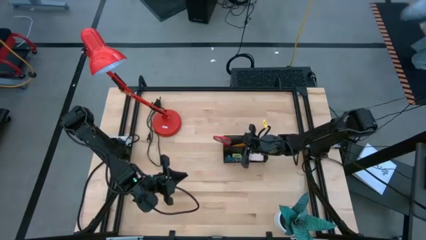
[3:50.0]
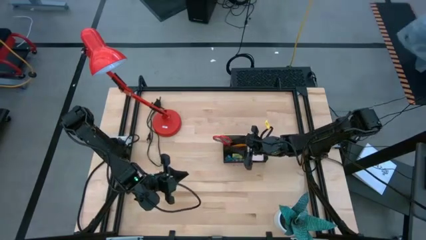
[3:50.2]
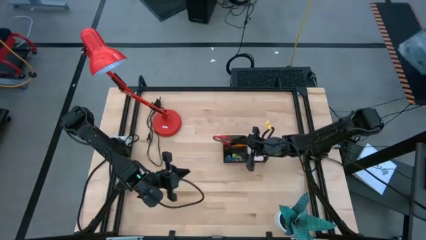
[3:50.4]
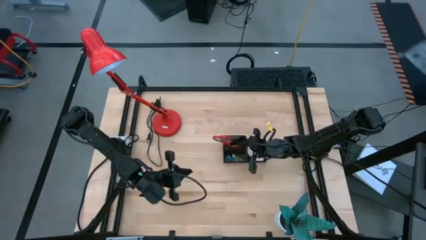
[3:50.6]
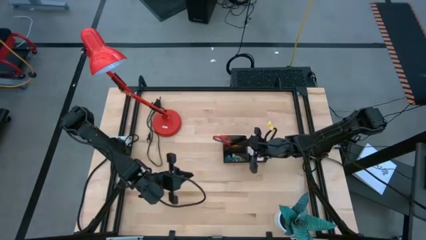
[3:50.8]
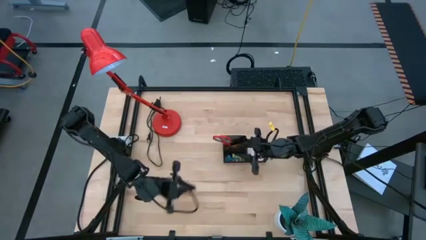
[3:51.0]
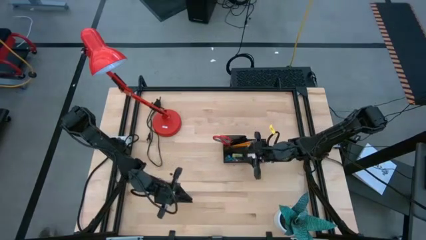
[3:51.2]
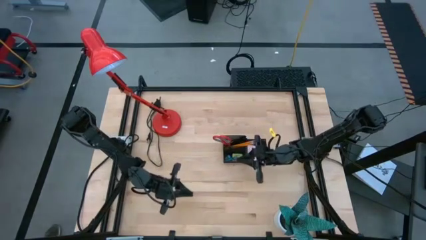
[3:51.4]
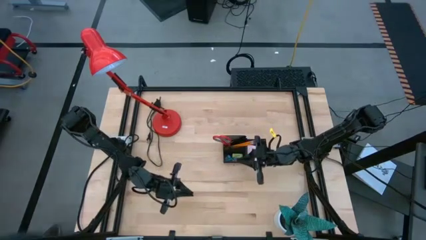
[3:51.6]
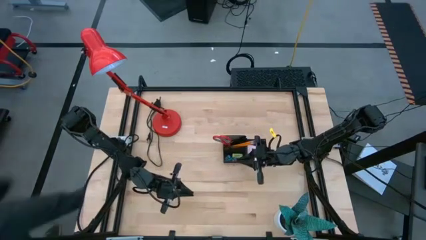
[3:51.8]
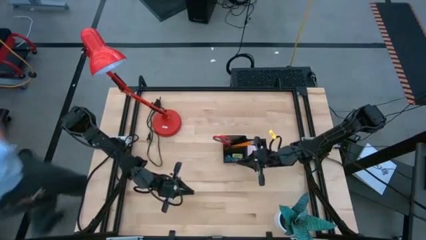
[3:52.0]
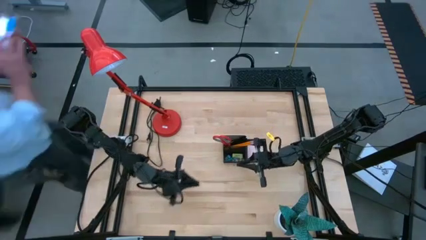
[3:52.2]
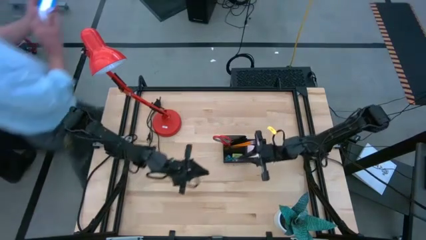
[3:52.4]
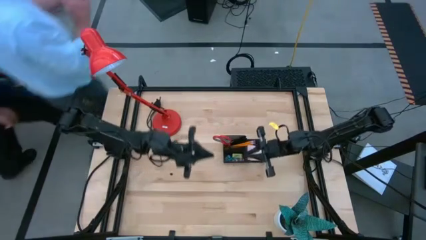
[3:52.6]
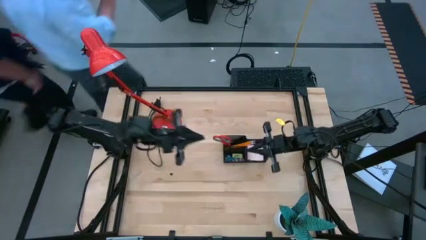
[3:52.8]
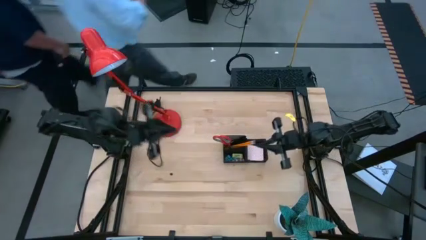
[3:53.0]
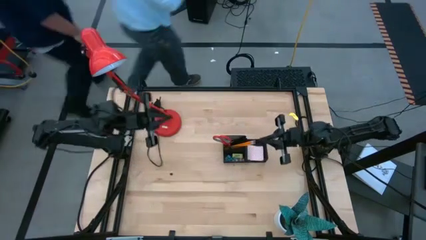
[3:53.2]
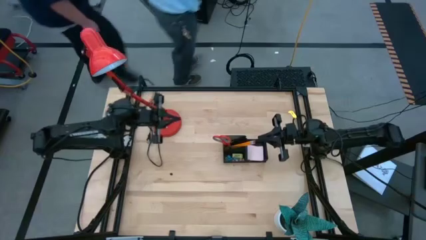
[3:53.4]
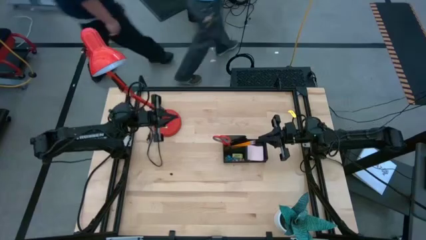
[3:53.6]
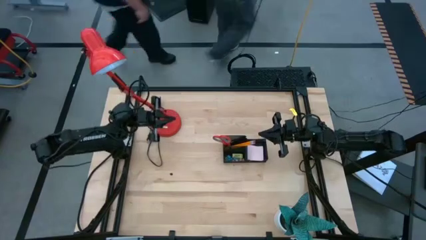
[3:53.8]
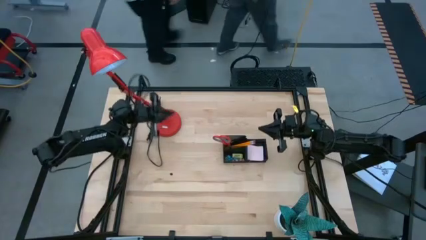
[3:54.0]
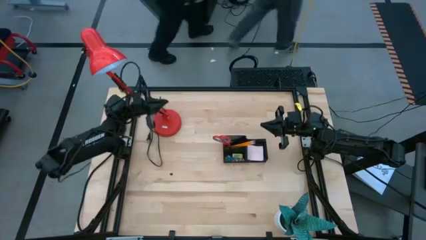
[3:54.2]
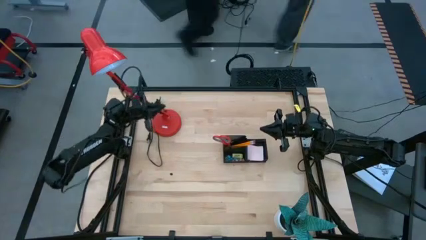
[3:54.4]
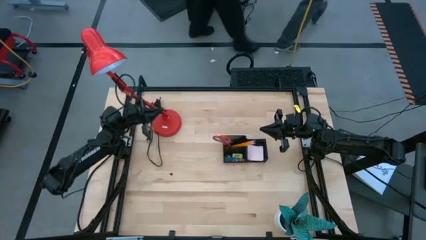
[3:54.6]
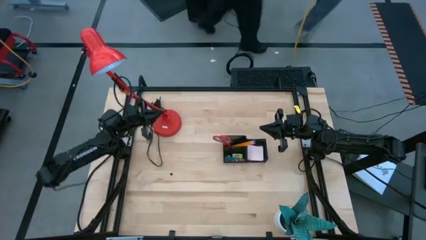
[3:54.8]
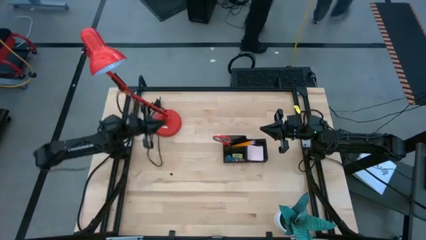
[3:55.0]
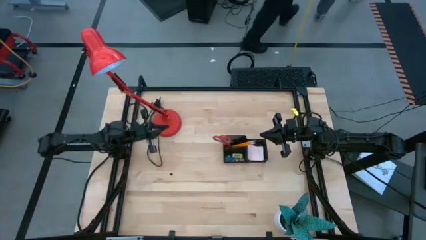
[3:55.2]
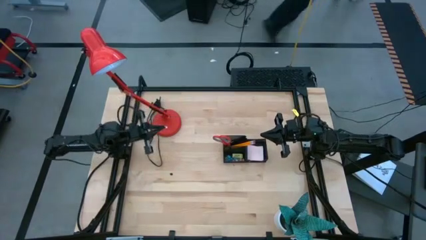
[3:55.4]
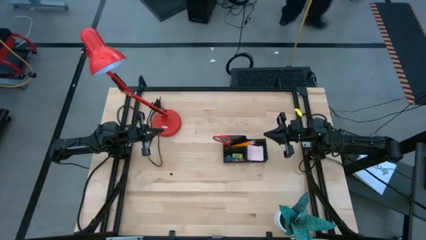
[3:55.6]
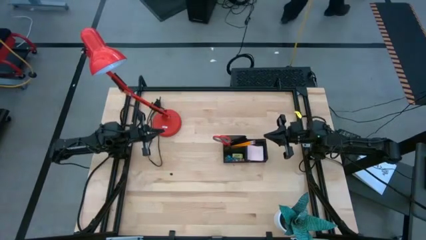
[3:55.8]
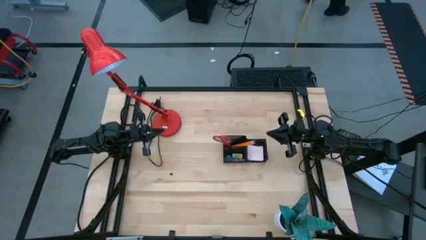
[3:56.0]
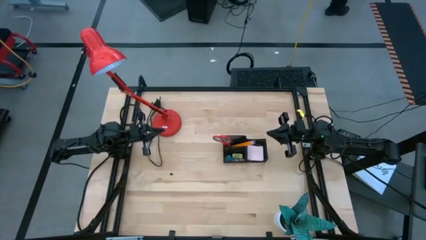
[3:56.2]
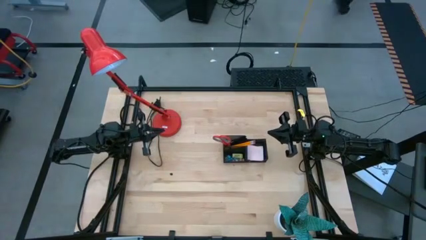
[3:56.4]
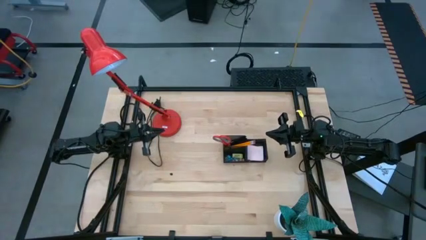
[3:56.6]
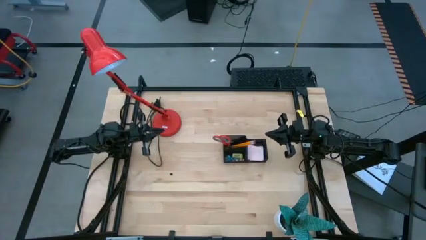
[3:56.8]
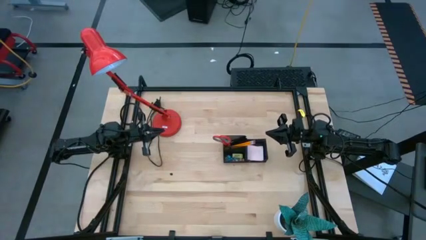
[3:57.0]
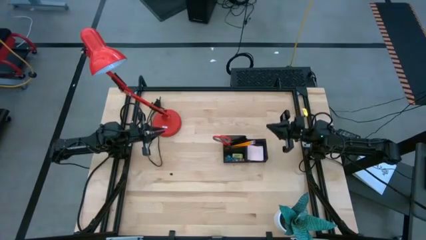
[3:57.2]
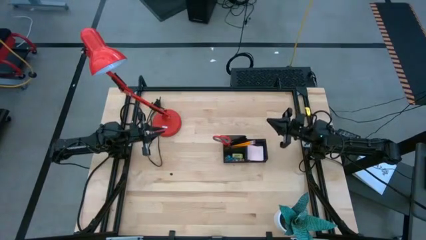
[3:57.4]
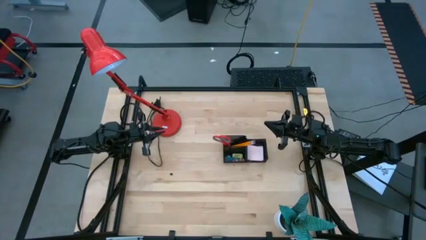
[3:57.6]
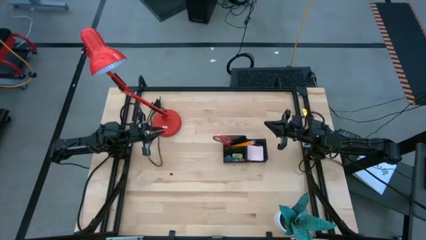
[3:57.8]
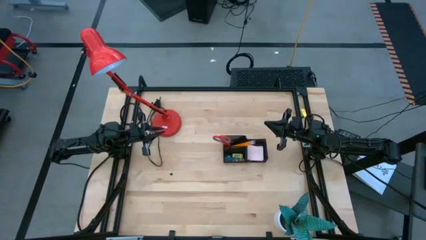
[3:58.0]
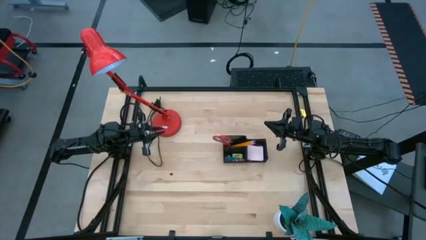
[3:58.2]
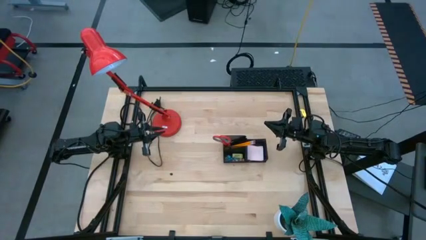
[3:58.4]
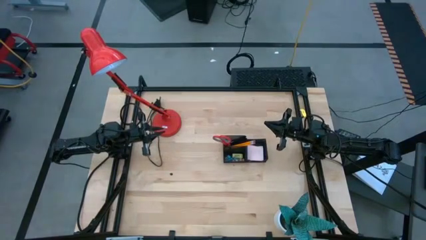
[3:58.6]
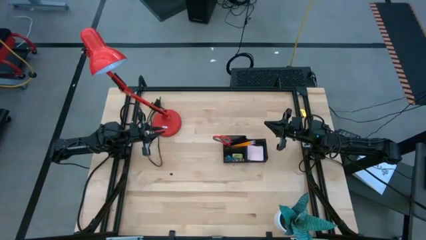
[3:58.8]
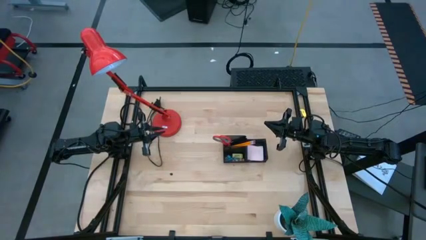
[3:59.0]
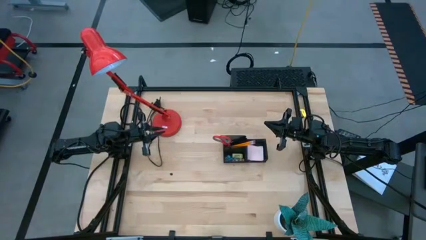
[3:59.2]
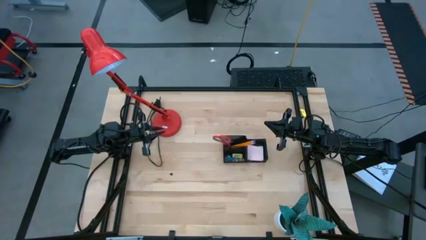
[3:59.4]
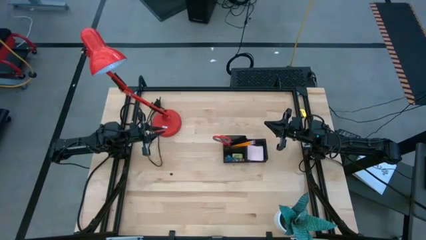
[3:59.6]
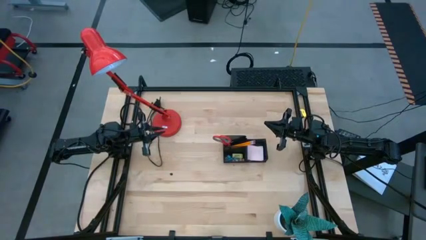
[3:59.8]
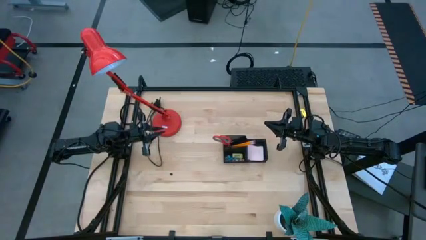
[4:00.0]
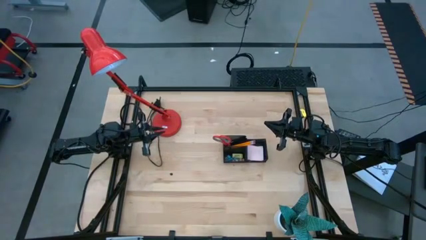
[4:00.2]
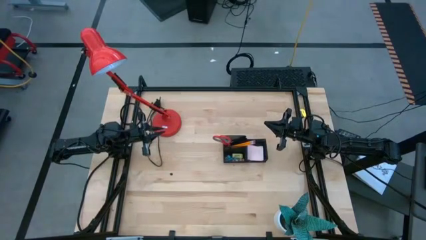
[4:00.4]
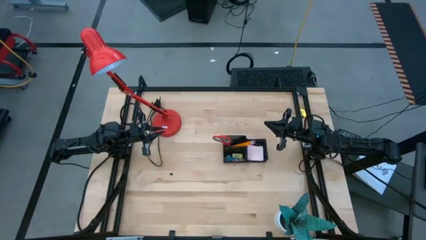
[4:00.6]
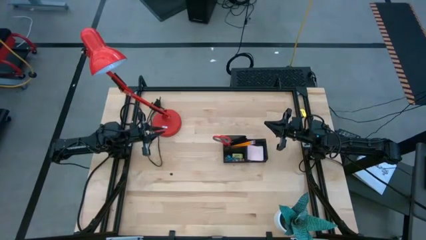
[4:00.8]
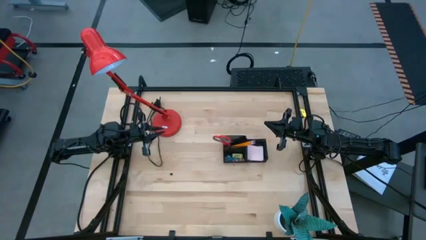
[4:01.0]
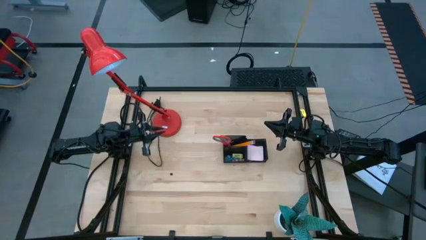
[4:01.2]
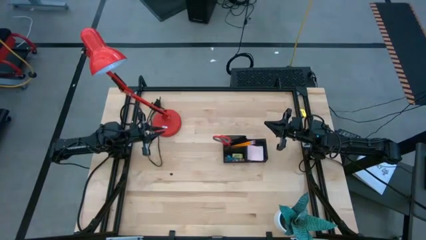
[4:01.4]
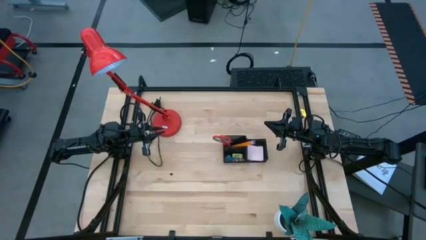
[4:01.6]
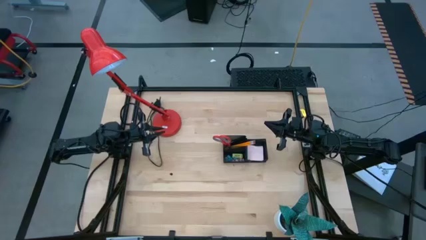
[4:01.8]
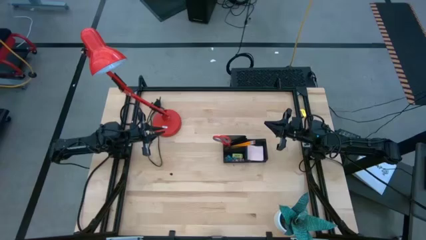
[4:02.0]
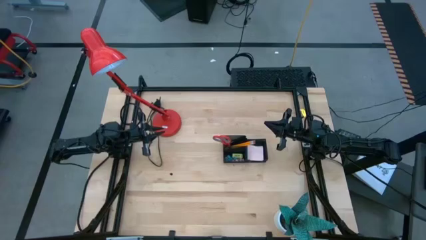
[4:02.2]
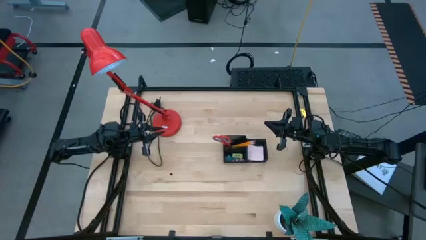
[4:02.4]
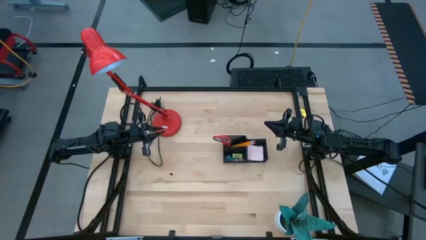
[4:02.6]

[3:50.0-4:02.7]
Task: Pick and place office supplies into organizer
Return to Home Position

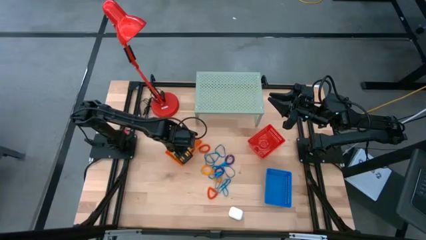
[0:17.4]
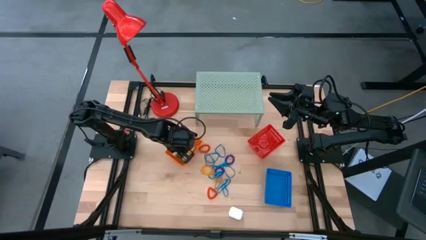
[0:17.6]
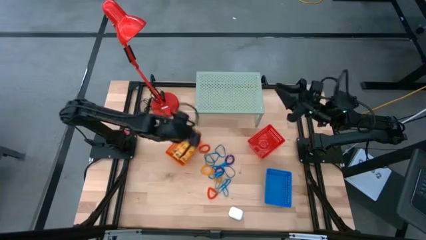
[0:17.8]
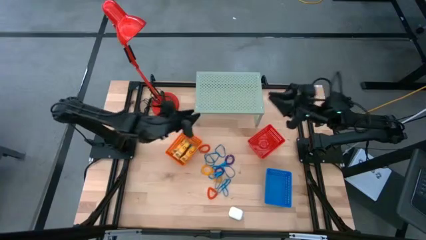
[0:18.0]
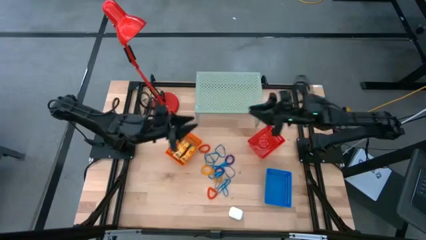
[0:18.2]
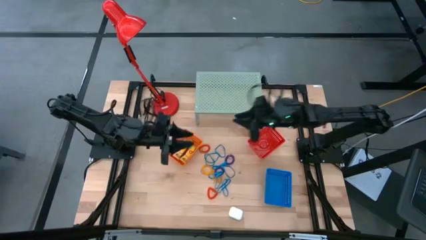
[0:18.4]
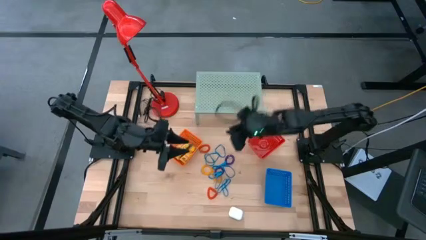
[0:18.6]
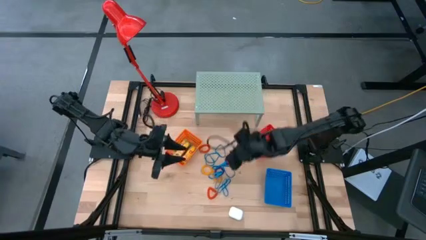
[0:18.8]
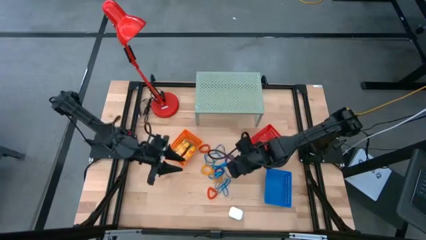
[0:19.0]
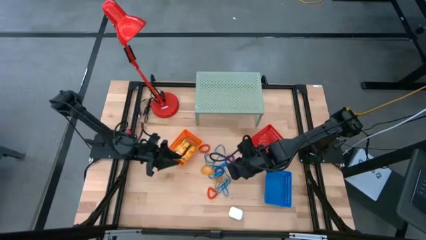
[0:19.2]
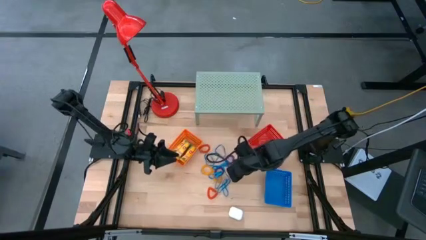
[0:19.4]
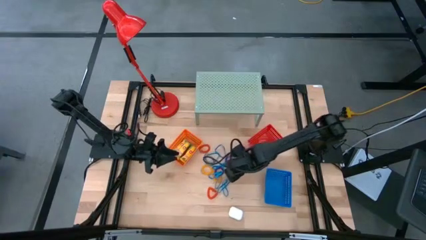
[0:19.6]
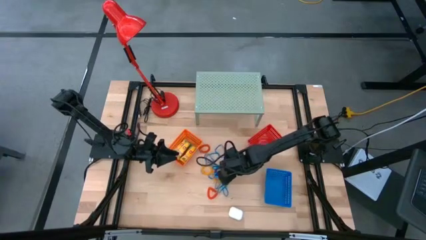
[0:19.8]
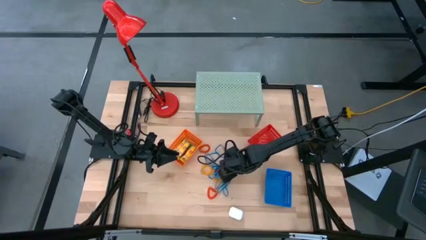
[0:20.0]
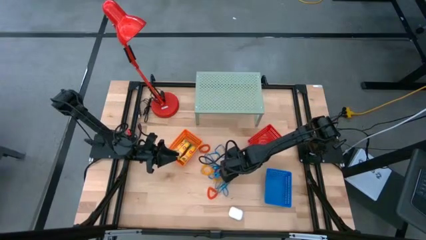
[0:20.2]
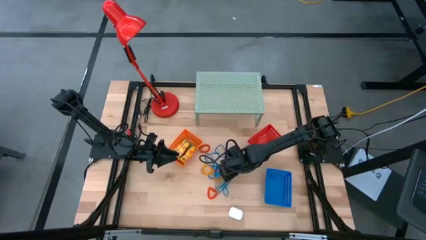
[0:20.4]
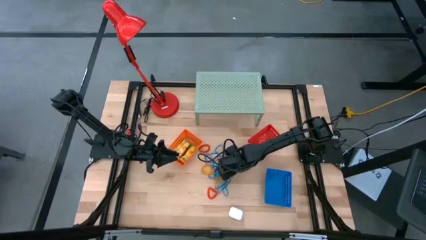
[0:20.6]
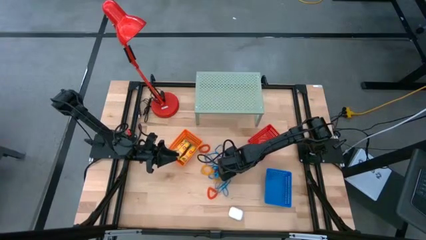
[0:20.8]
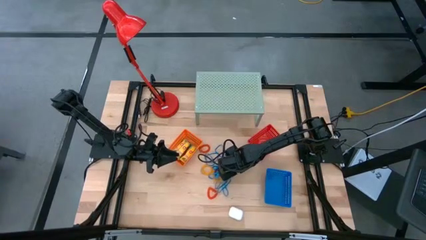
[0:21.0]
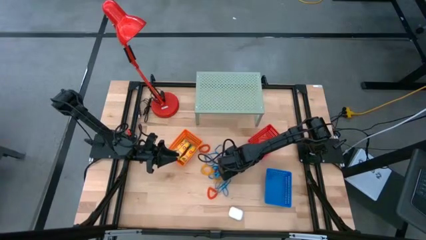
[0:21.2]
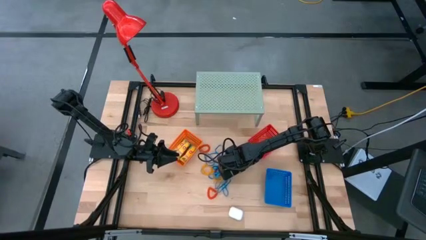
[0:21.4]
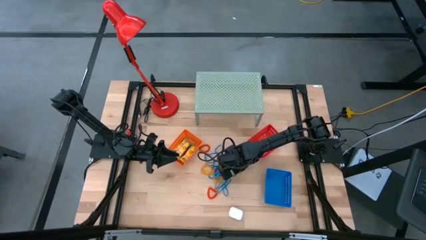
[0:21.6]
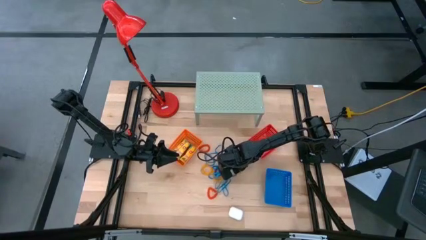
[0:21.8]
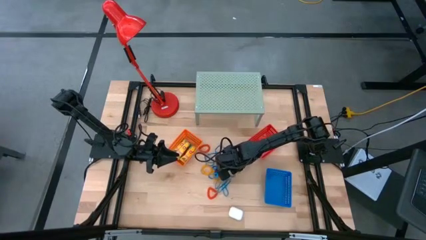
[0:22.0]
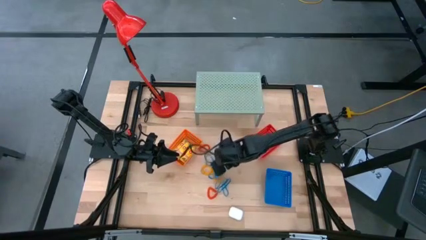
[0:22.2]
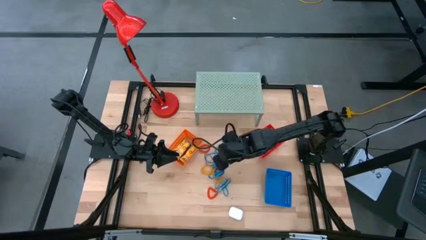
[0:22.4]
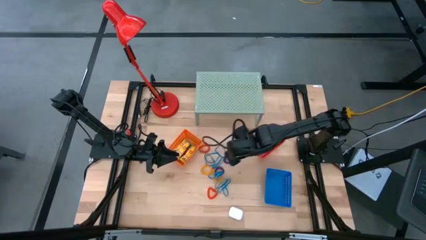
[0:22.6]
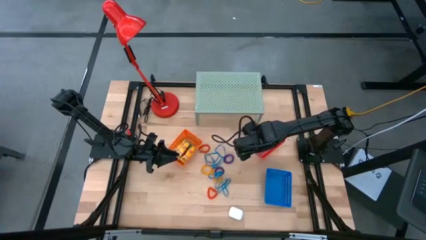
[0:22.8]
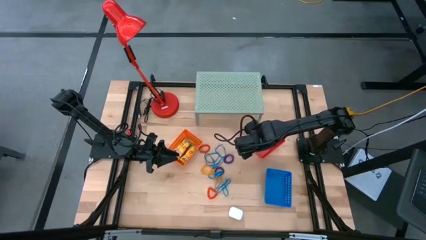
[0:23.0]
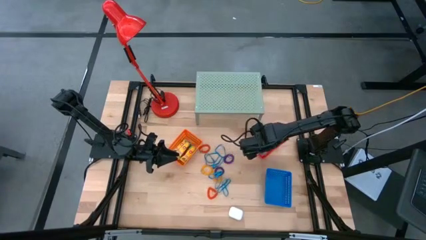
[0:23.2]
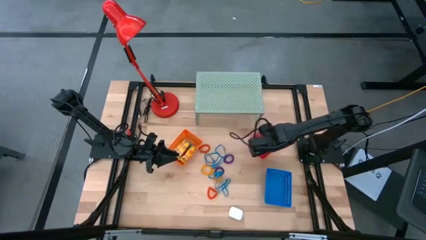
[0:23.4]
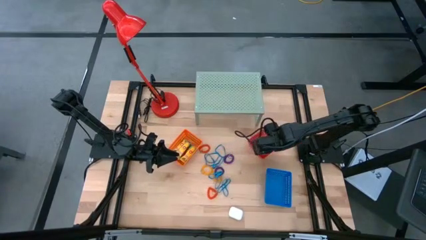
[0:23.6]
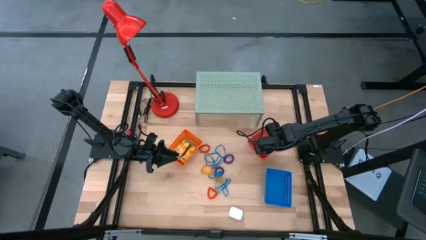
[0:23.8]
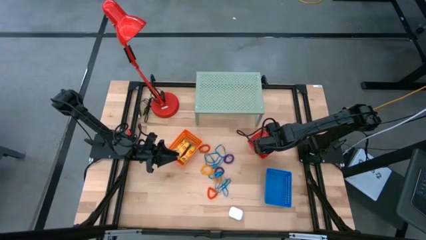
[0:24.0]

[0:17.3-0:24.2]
Task: Pick & Place Office Desk Supplies
Put the blue rubber band into the red bin
